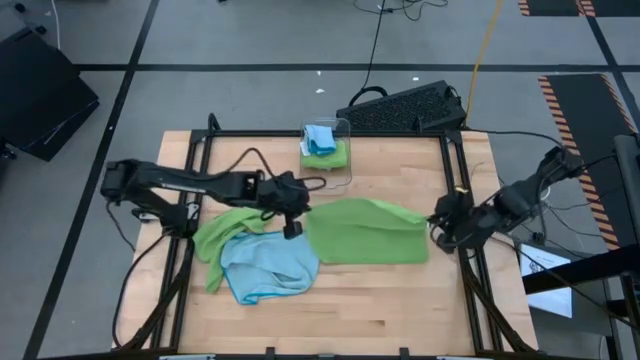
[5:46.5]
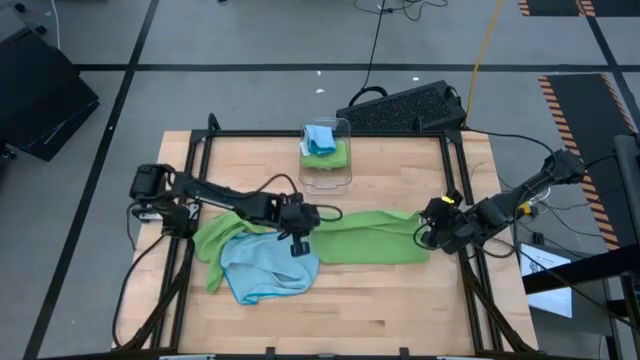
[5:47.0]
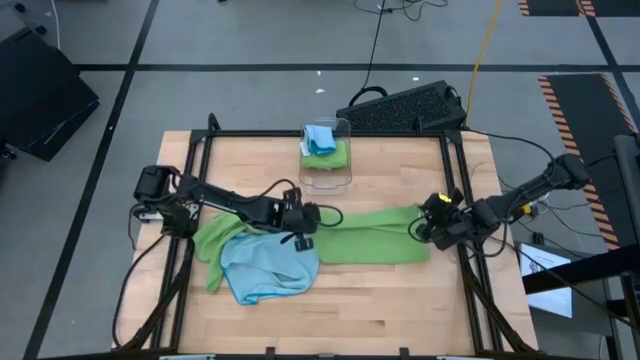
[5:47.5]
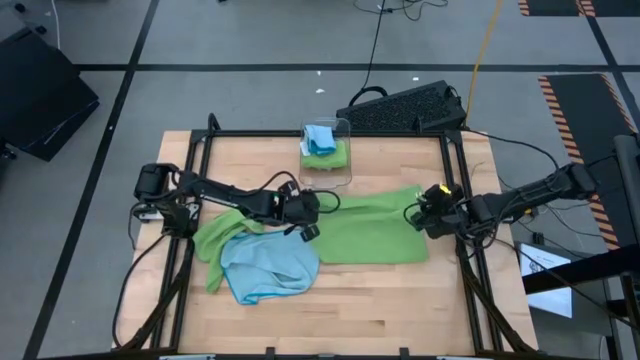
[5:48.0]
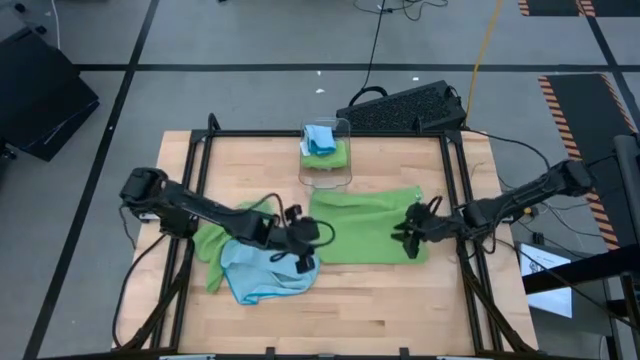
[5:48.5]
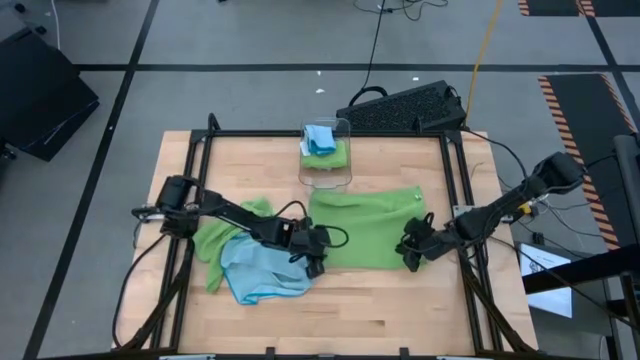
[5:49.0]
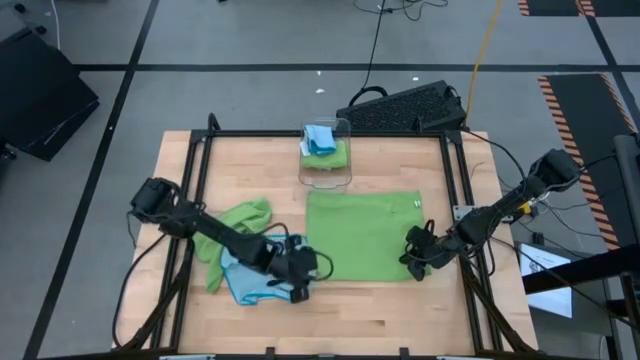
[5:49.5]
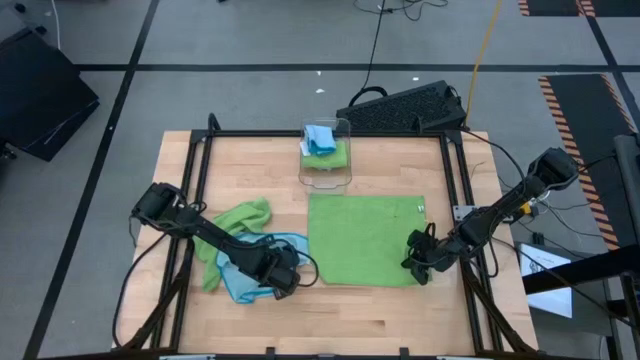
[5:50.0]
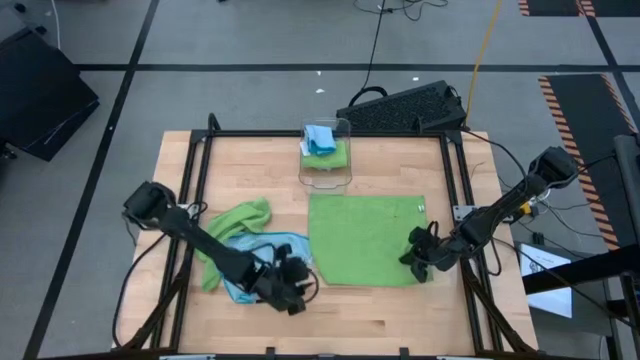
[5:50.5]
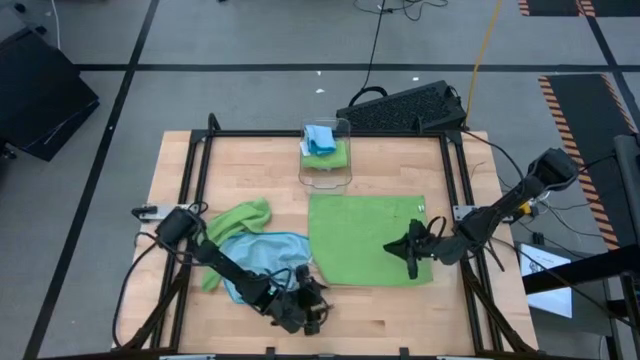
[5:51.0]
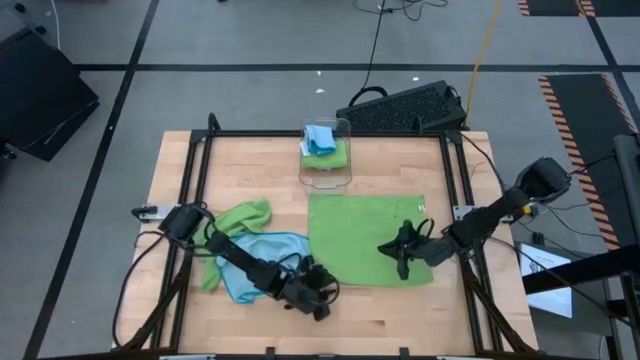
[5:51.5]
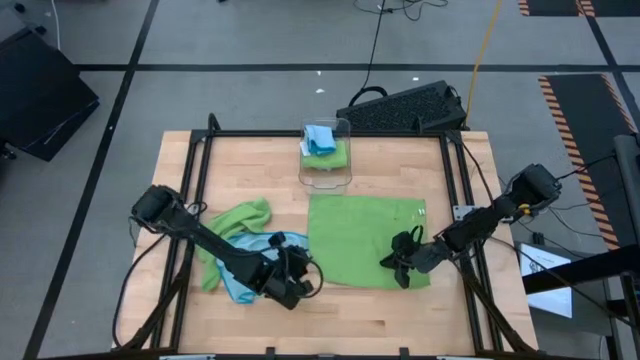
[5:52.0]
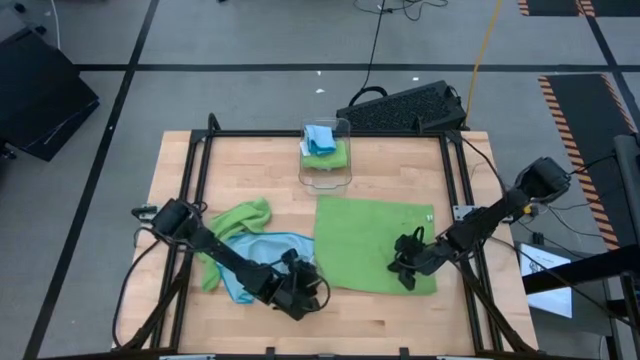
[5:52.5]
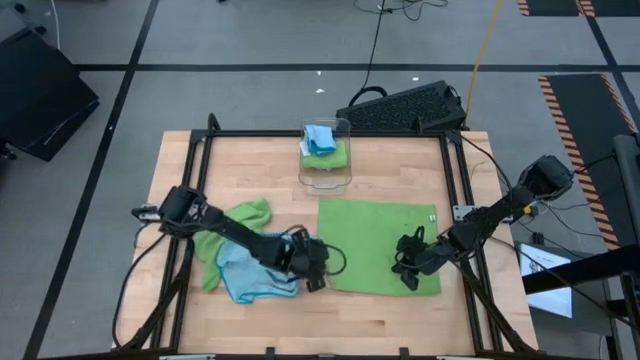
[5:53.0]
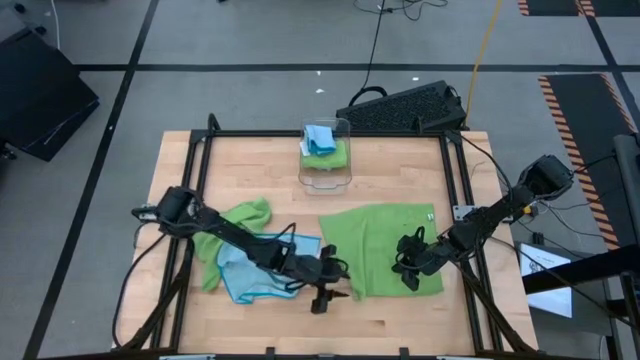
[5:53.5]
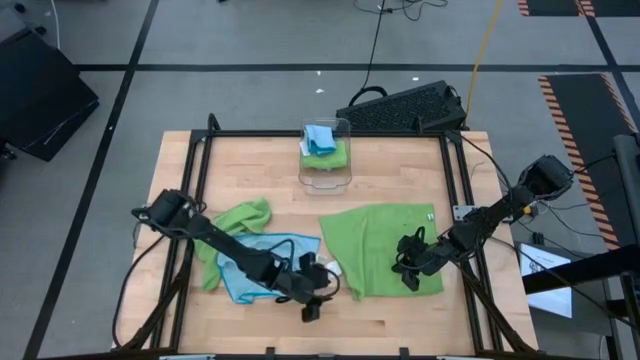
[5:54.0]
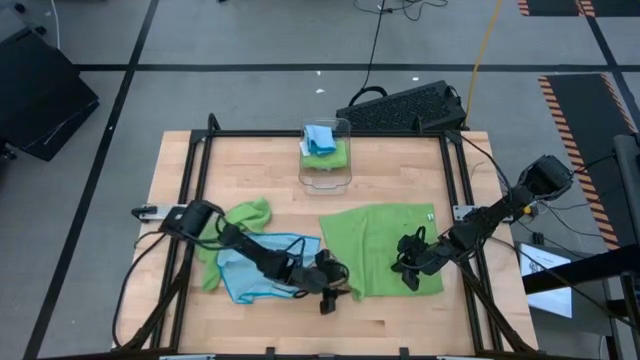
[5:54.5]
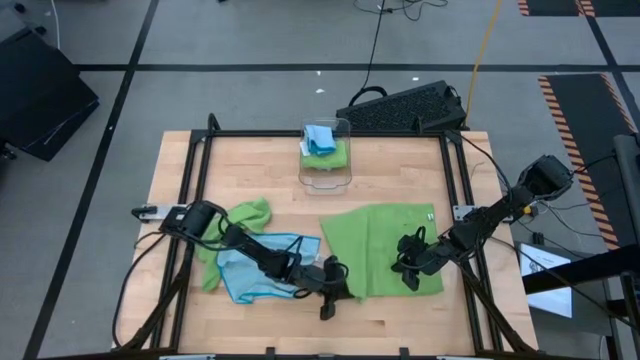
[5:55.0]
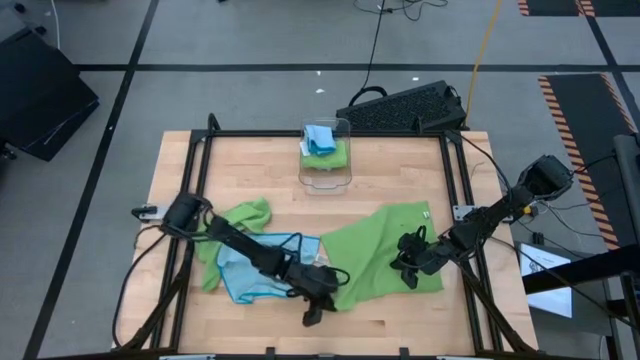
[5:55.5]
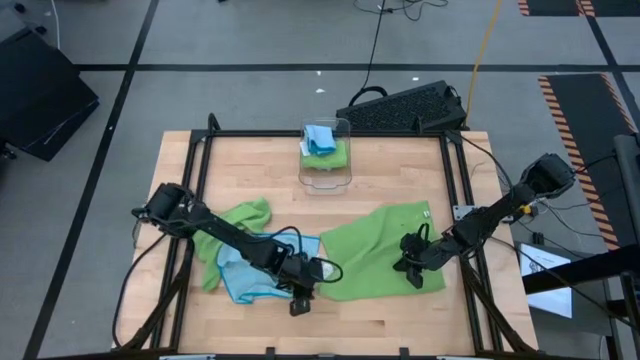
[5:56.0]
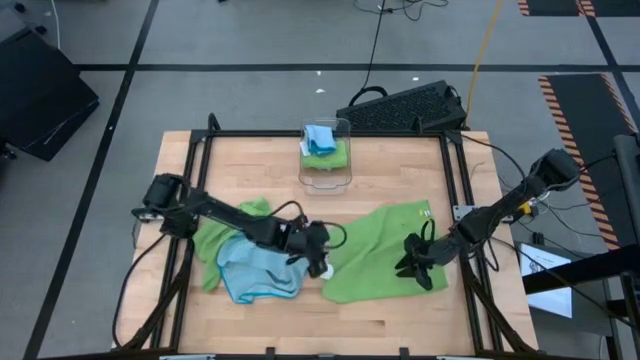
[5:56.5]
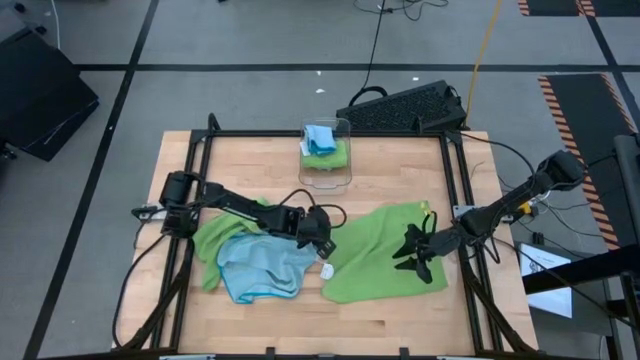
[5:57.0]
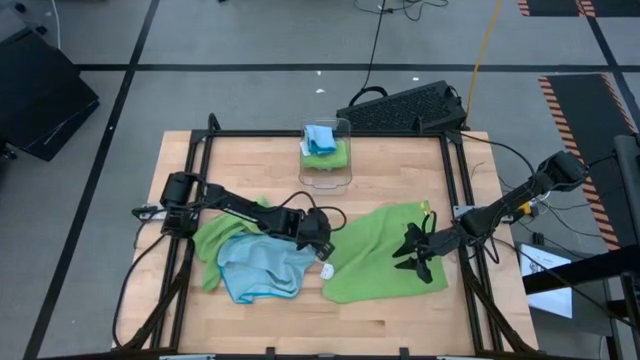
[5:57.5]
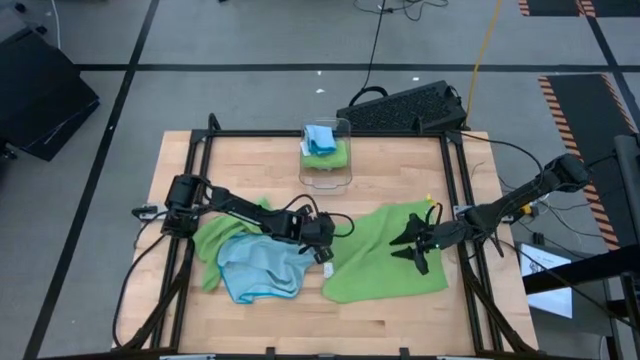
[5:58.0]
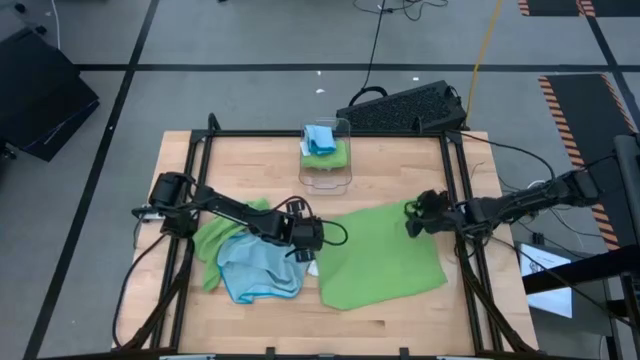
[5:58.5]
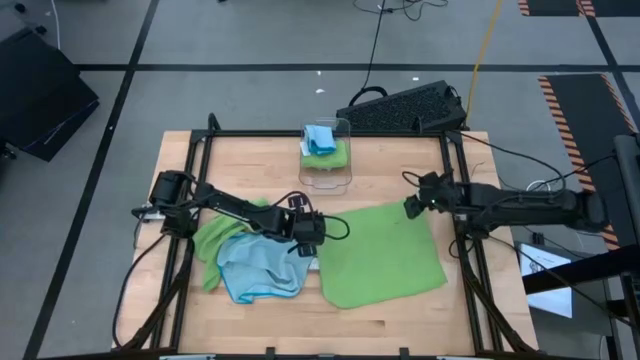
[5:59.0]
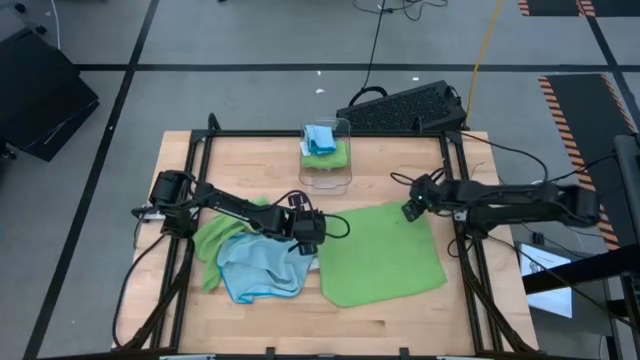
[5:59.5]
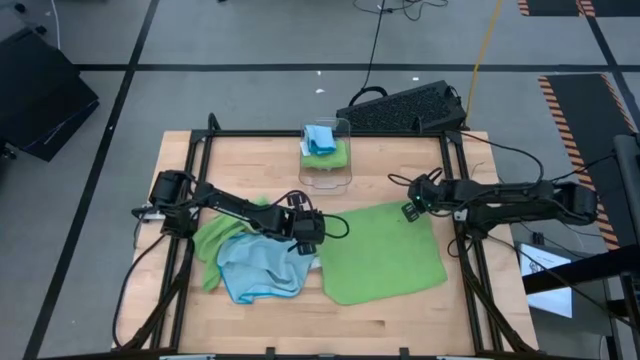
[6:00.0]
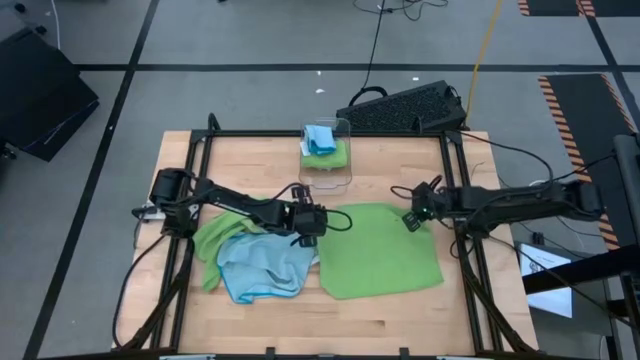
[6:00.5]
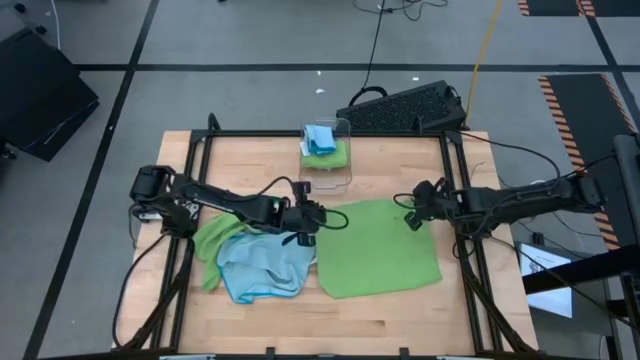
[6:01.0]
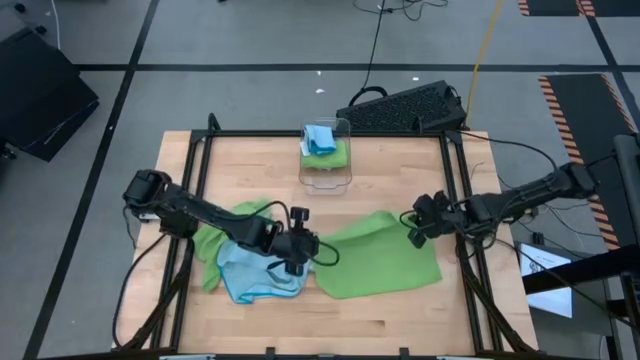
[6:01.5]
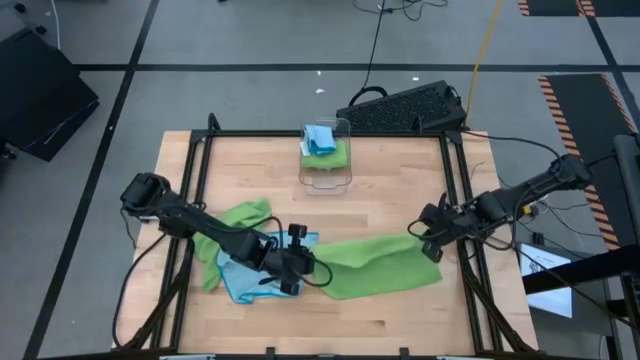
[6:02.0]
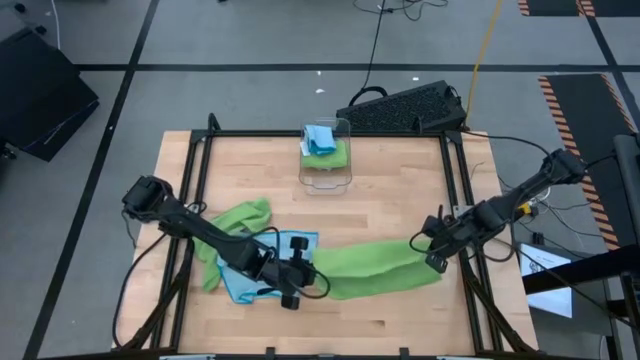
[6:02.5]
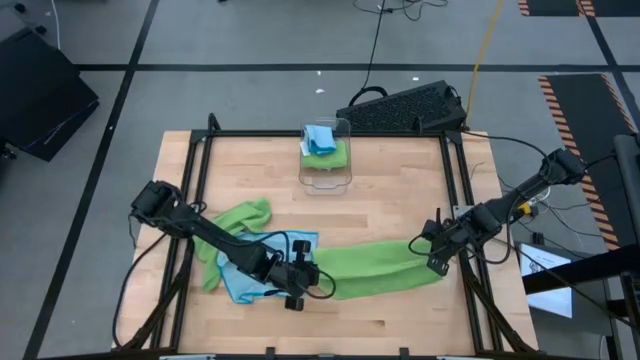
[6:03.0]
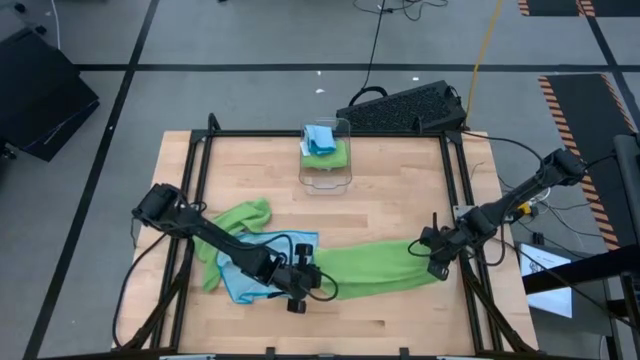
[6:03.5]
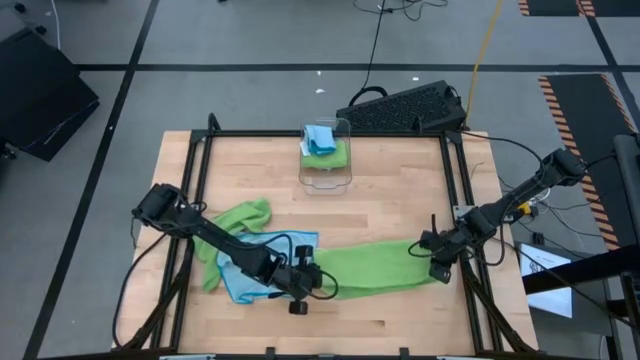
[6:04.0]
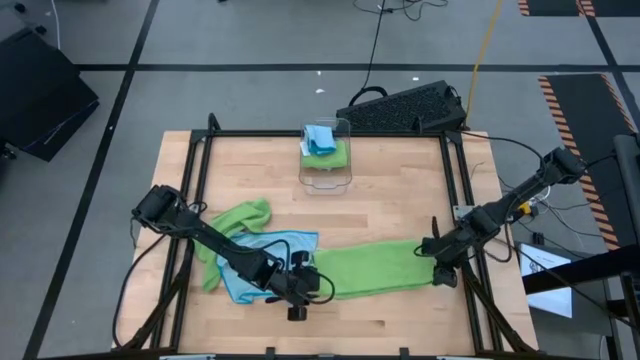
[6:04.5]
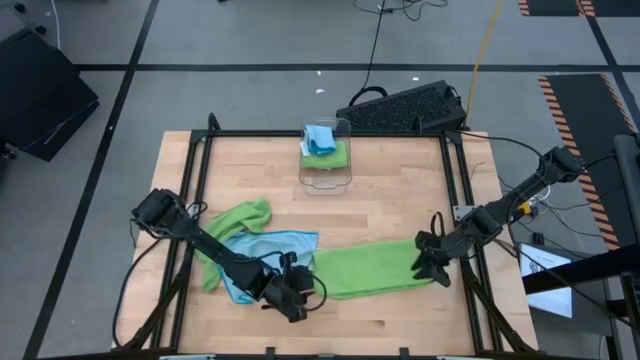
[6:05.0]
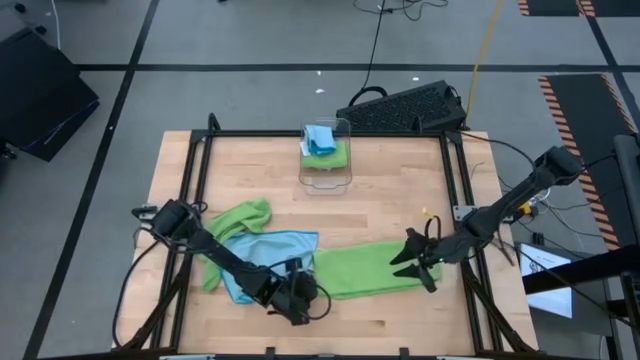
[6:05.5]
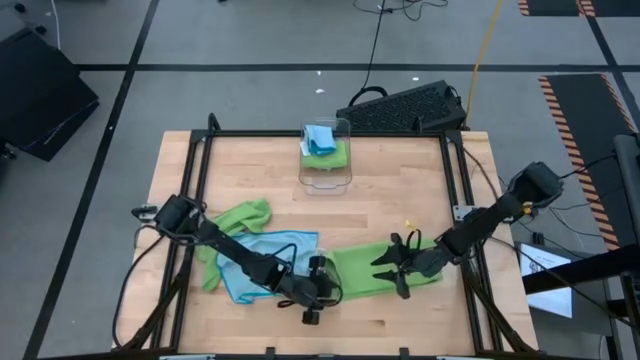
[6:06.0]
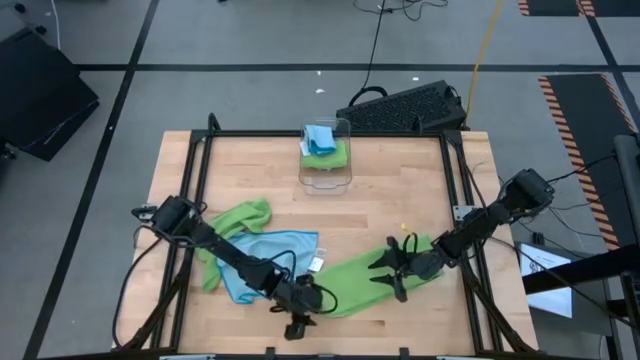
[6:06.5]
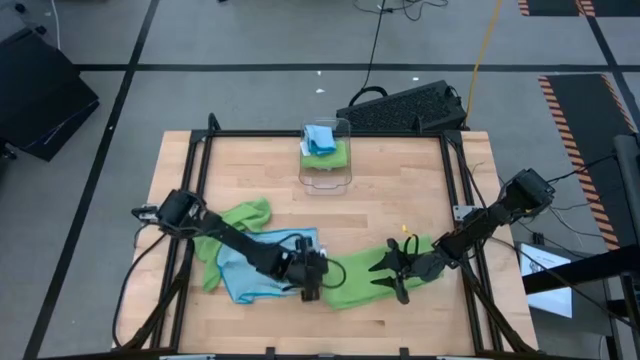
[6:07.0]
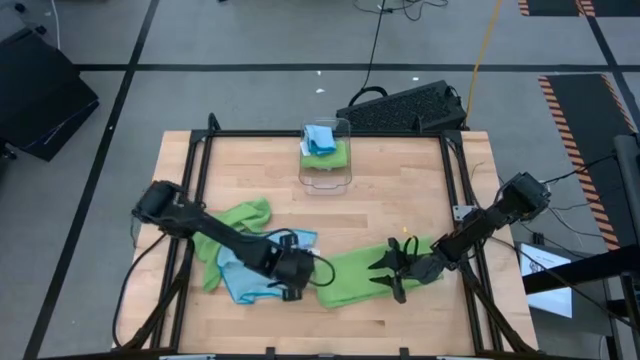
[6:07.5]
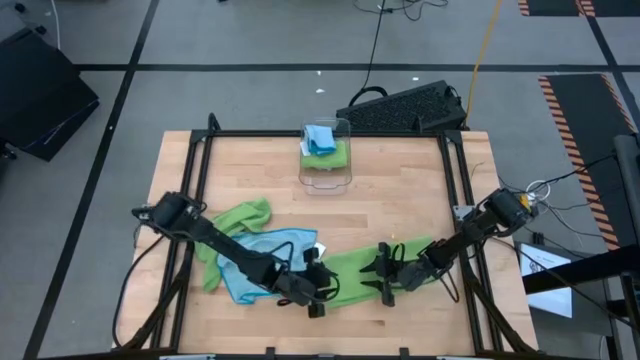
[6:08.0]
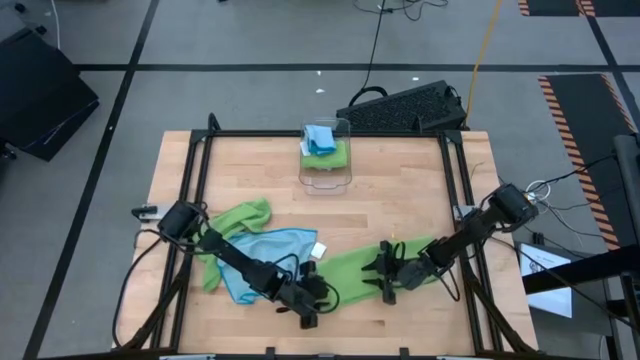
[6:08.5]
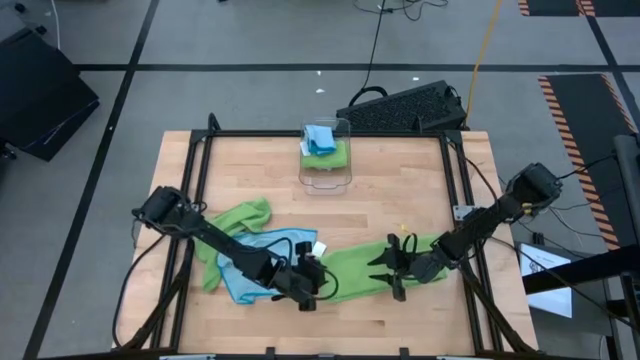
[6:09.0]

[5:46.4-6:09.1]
Task: Fold microfiber towels
Fold the right green towel
